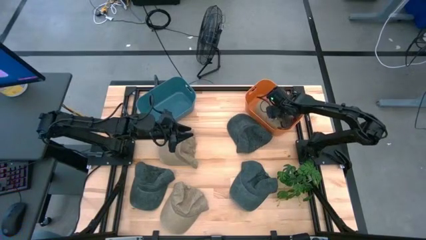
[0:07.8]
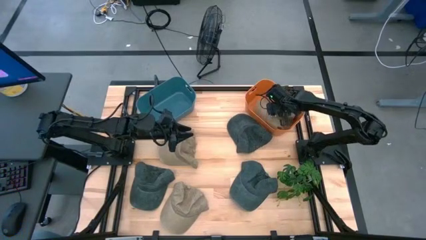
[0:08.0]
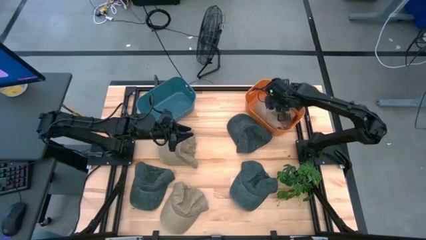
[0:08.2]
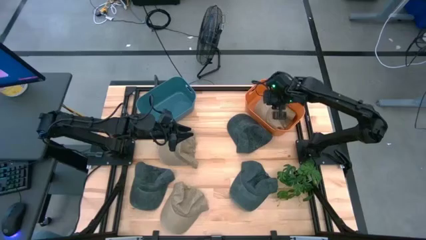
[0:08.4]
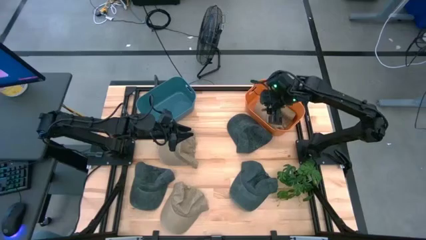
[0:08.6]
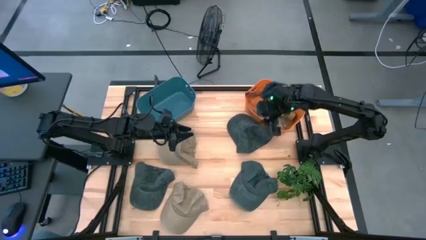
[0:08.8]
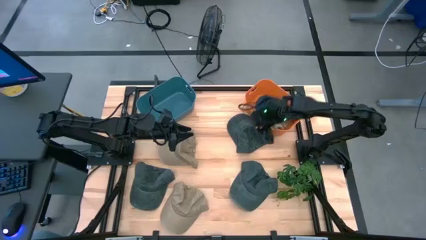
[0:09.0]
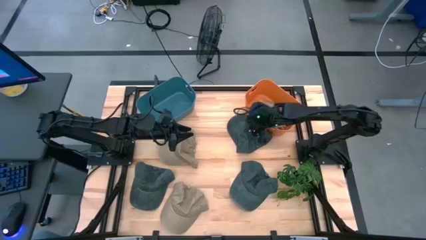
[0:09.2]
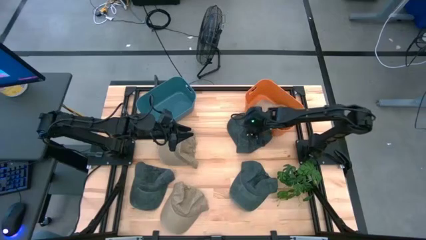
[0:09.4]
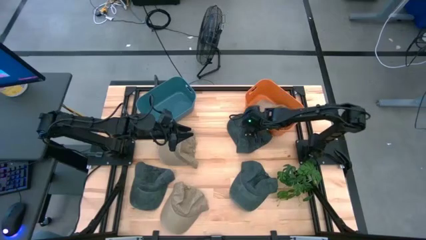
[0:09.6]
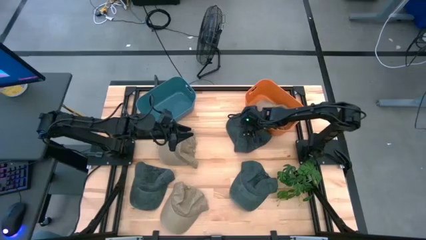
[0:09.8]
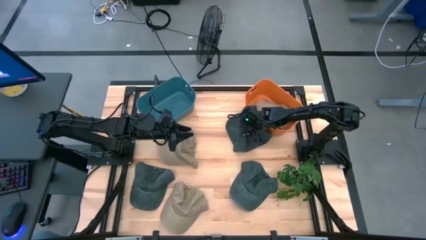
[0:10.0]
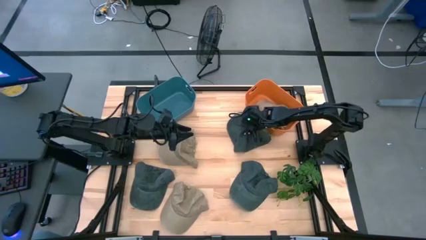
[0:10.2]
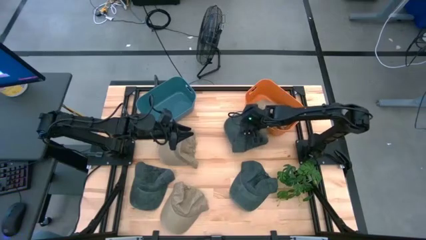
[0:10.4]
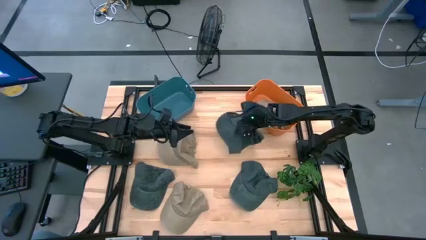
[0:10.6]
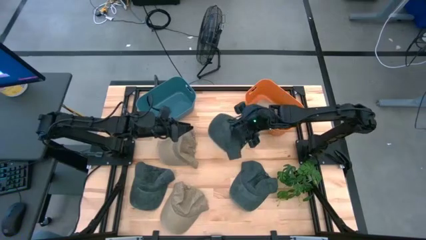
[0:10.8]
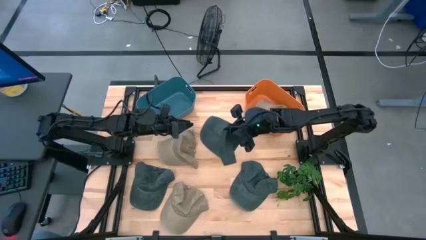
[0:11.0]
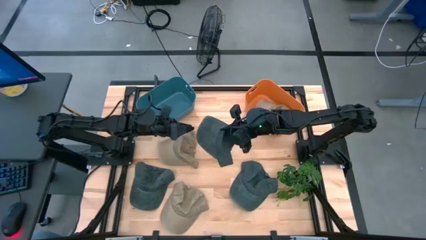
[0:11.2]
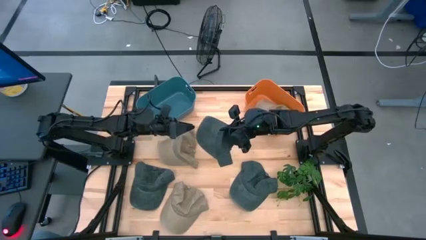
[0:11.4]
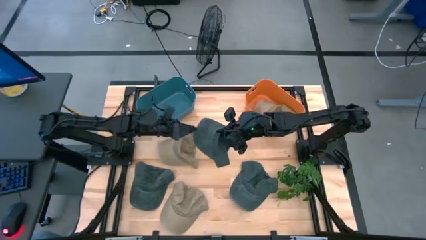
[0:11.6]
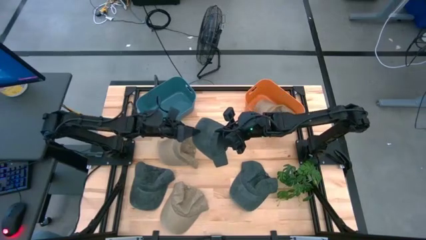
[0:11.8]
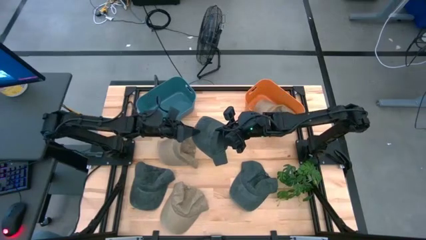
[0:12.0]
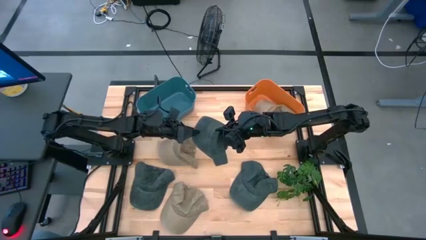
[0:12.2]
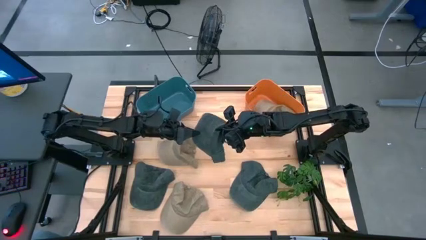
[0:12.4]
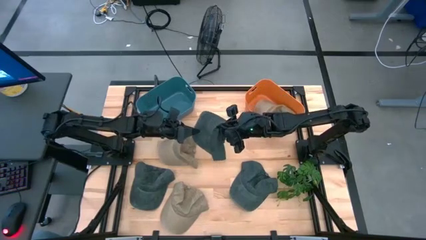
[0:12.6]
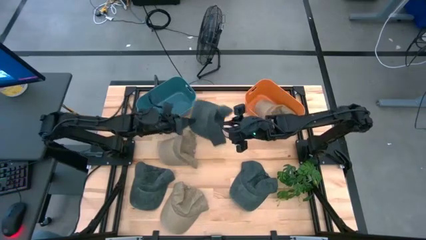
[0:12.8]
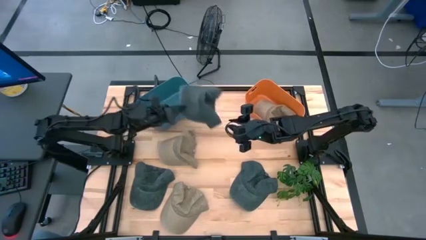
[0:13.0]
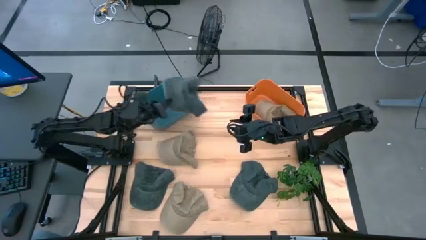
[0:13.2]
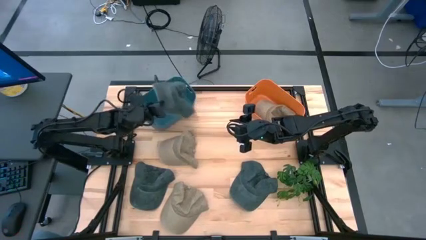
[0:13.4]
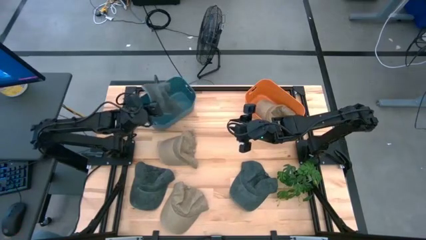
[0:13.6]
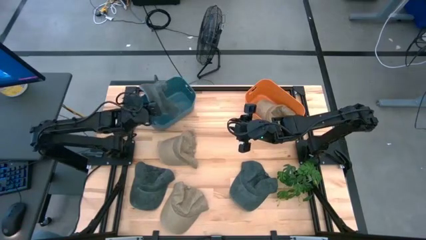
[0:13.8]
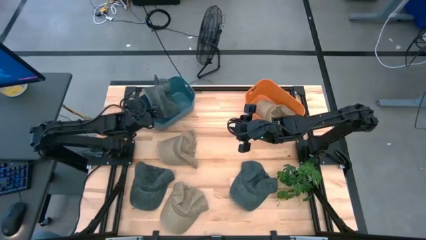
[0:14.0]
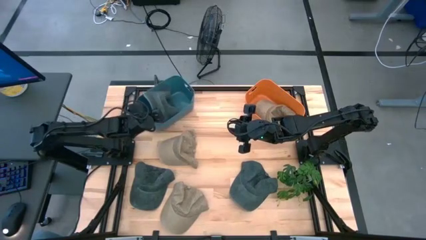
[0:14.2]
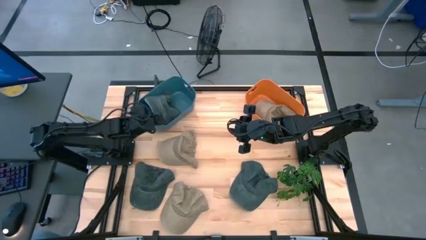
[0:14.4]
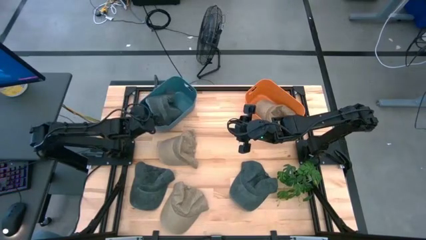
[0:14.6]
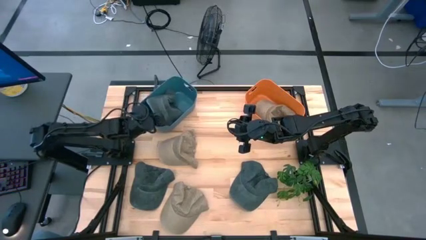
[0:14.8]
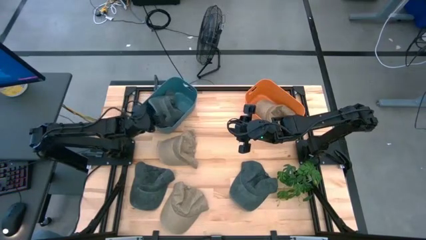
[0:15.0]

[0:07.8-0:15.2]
Task: Pick & Place hat
Put the top blue cap into the blue bin

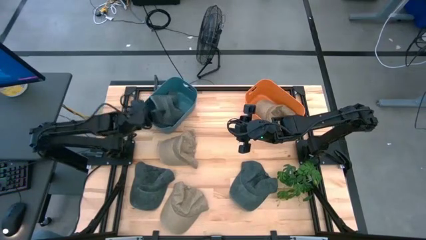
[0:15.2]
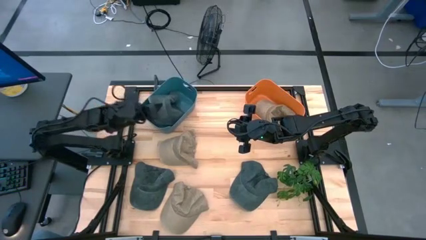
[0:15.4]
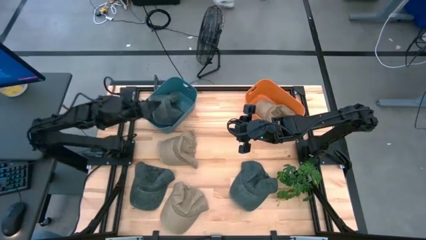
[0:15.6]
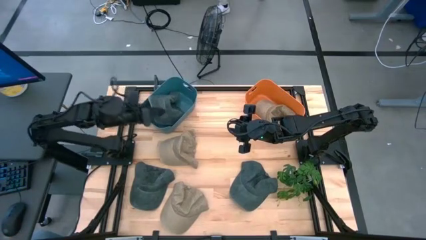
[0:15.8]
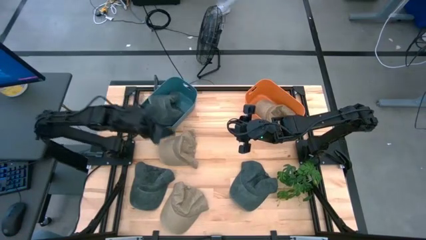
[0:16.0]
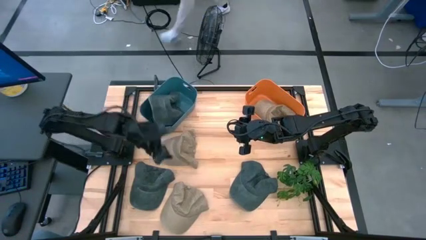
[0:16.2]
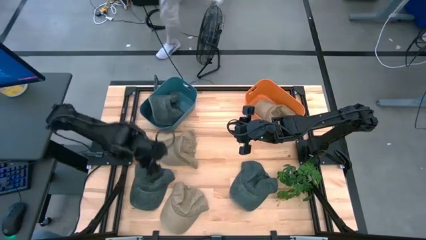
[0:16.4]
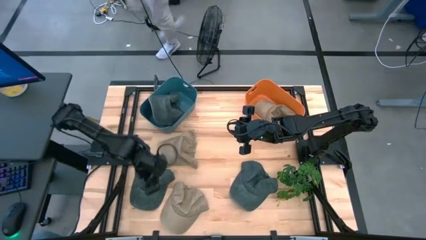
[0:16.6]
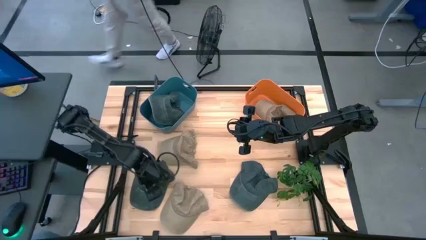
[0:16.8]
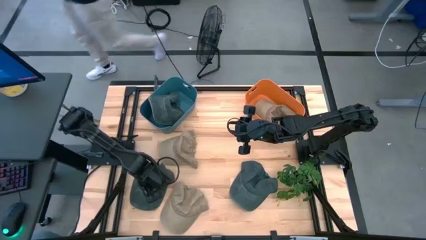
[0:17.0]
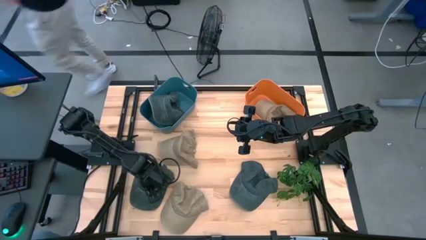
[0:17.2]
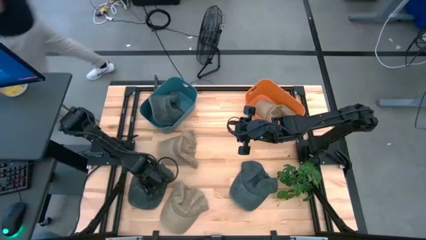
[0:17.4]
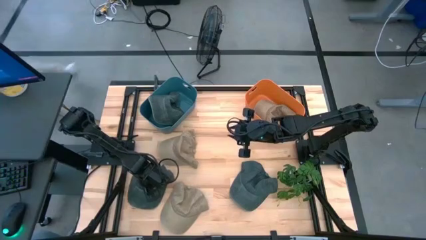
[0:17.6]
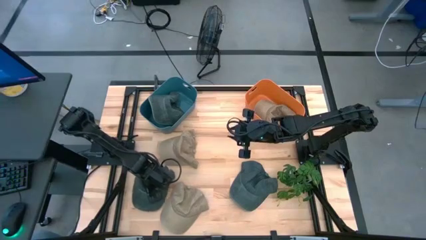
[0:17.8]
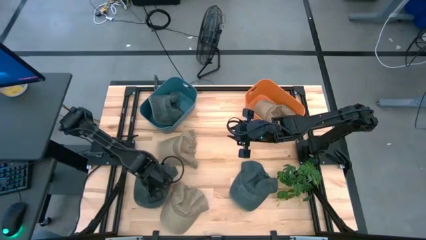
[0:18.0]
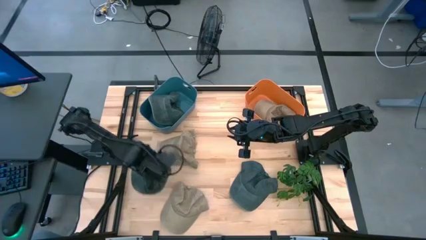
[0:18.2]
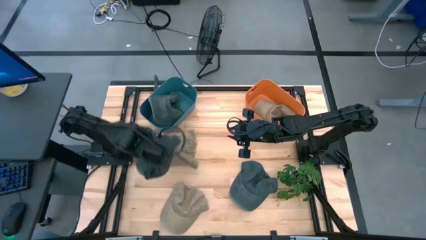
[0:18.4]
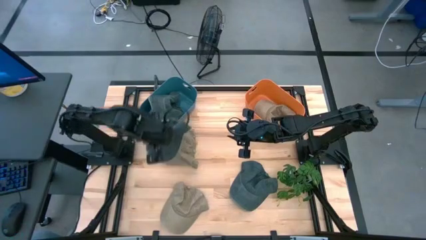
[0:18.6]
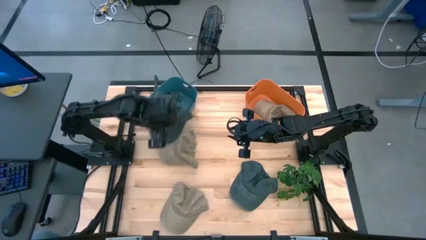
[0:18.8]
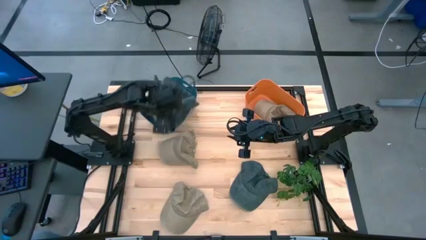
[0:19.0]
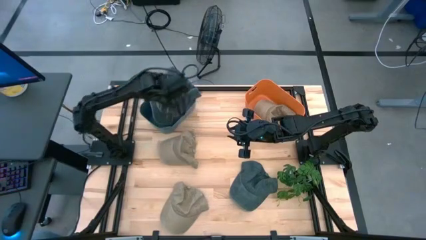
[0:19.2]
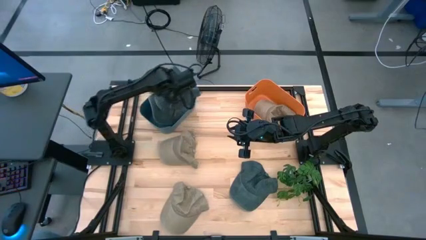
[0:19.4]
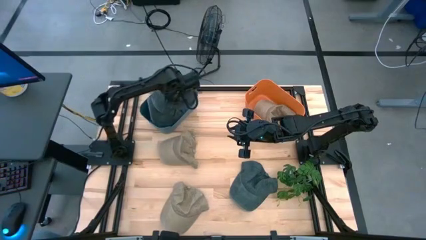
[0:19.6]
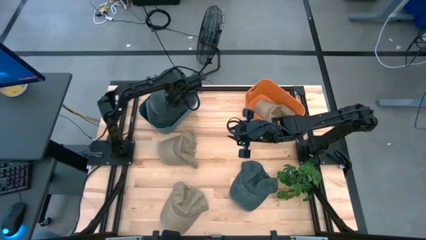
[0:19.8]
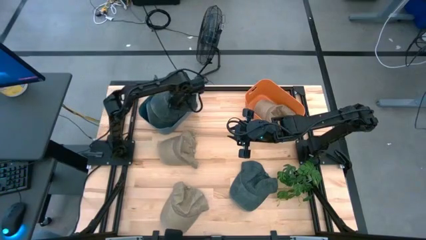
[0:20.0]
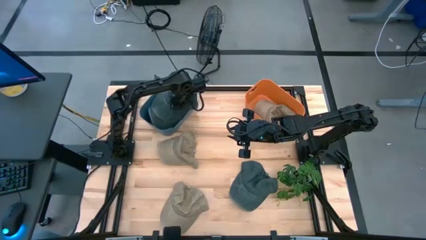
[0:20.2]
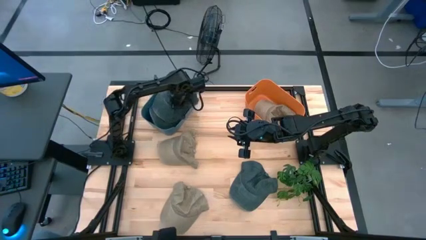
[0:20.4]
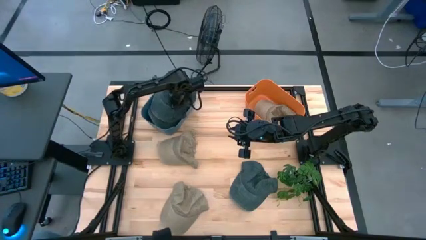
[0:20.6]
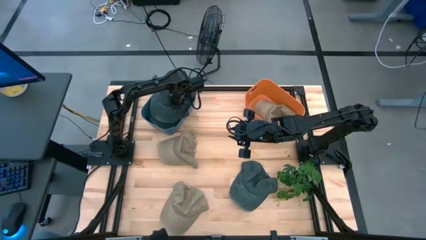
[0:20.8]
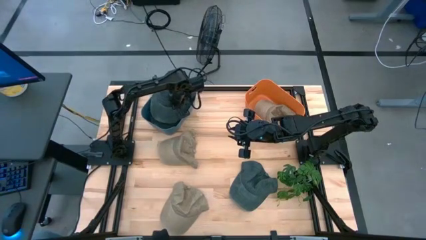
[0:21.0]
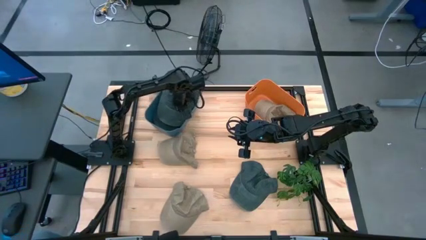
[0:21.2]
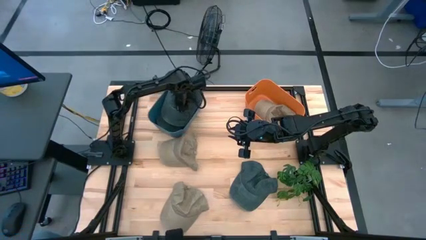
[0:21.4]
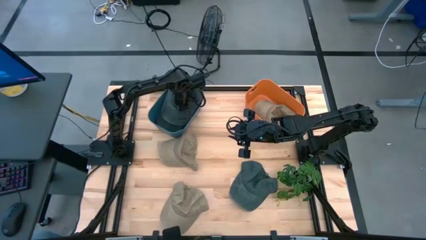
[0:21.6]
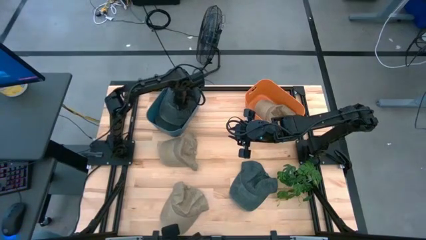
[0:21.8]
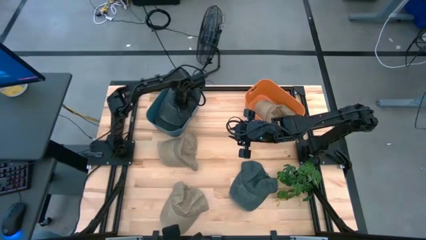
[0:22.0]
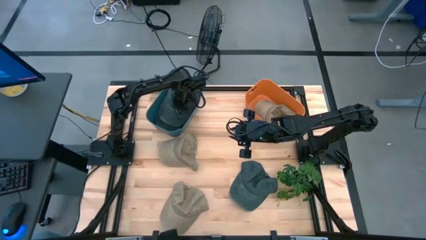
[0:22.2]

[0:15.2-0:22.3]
Put the left blue cap into the blue bin

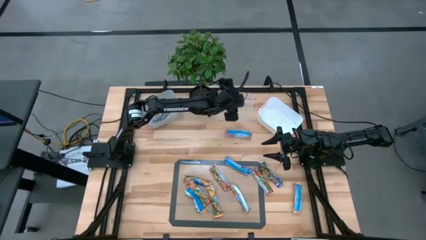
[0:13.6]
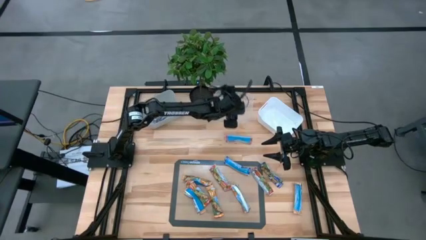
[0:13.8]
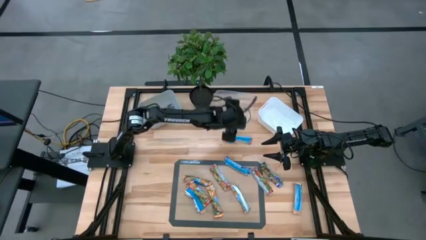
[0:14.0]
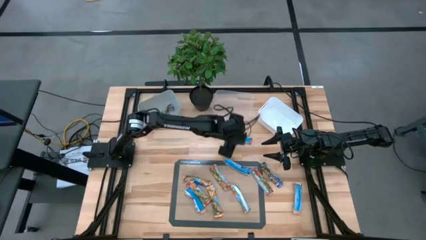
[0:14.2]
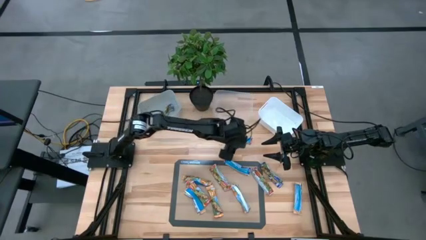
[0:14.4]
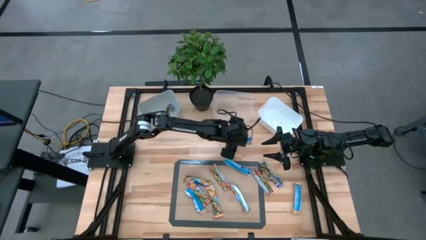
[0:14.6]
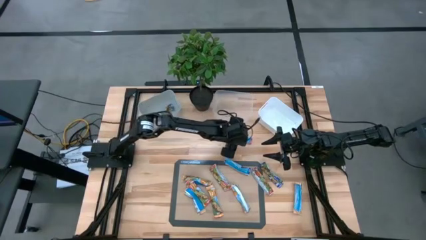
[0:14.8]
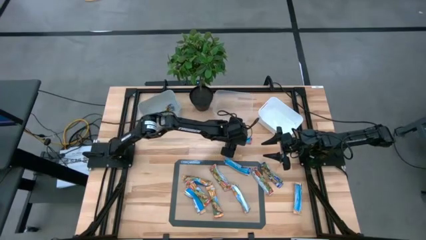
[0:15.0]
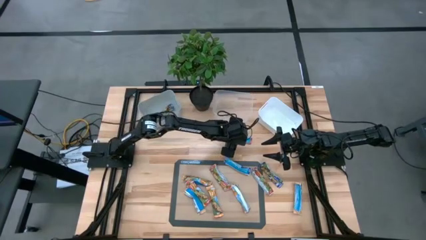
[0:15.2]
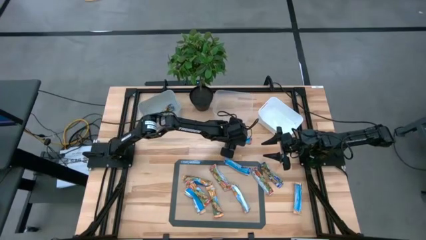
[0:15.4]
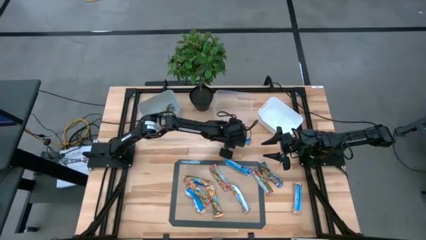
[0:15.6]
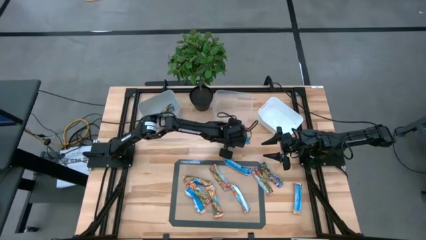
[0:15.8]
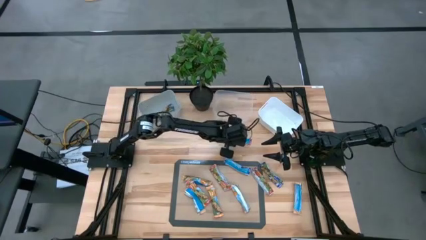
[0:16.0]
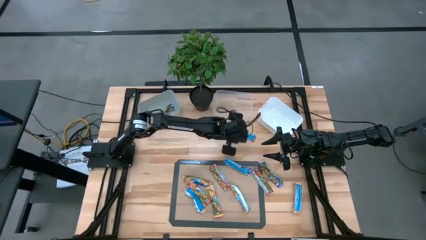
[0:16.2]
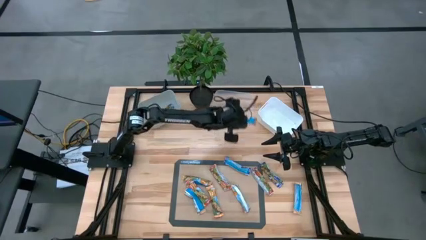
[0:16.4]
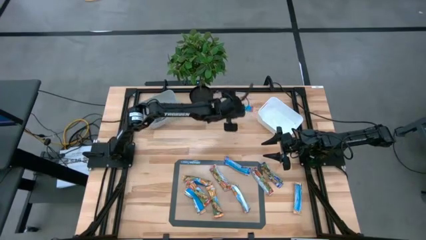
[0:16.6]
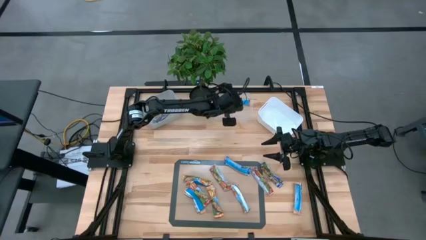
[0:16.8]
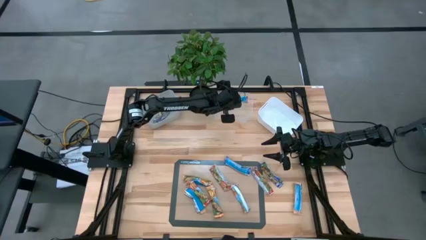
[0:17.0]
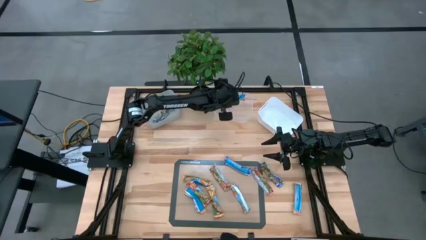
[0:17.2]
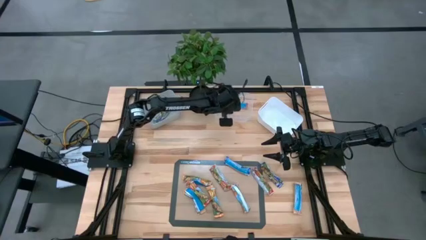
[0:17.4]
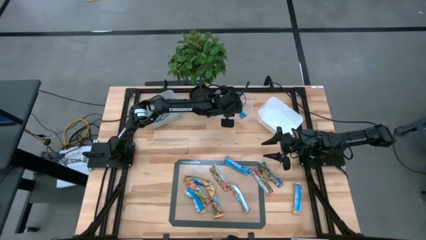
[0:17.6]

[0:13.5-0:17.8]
Task: Pick and place Granola Bars by type
Put the red granola bar into the transparent bin
